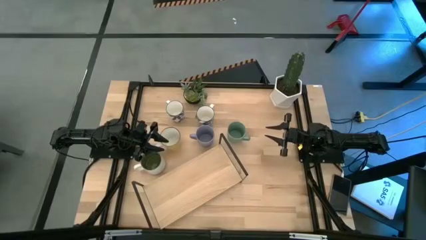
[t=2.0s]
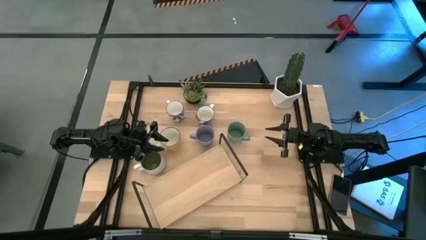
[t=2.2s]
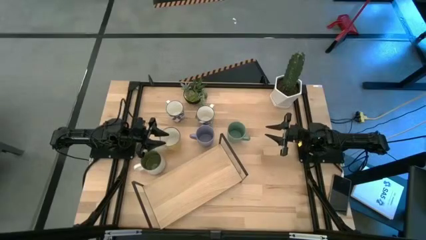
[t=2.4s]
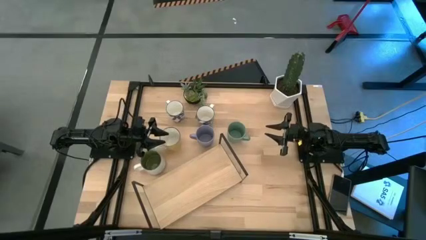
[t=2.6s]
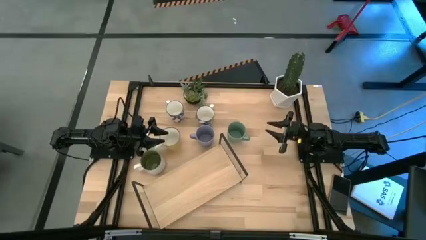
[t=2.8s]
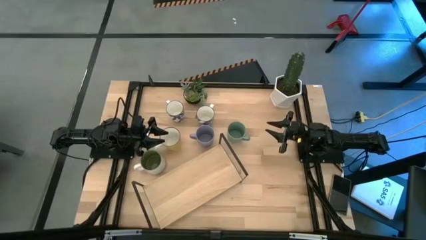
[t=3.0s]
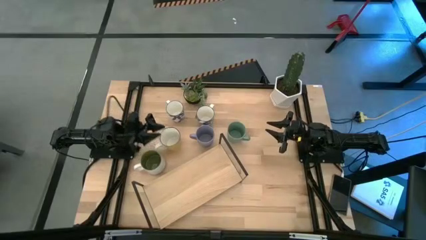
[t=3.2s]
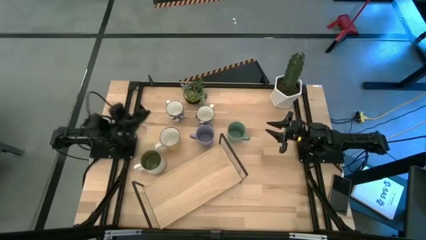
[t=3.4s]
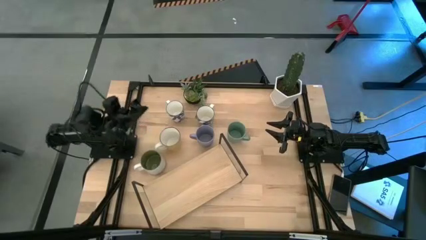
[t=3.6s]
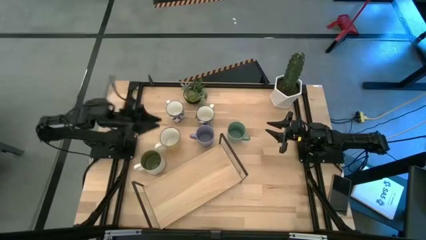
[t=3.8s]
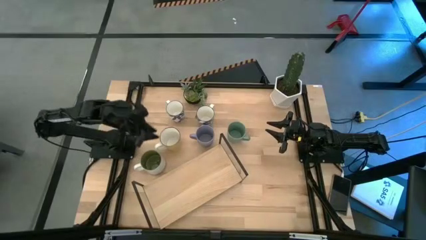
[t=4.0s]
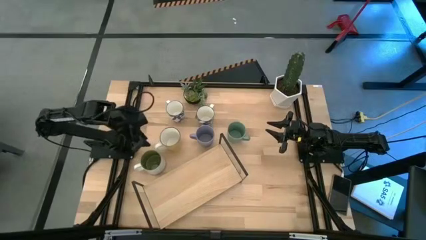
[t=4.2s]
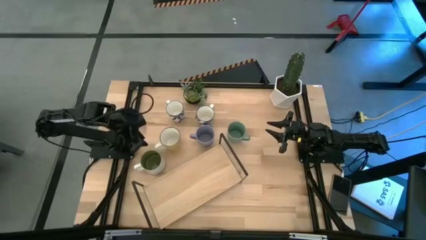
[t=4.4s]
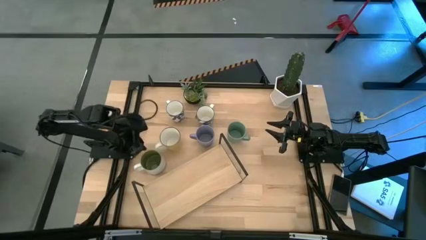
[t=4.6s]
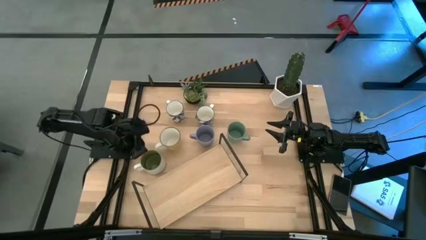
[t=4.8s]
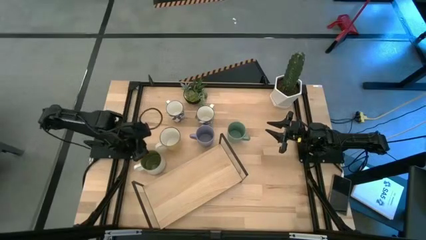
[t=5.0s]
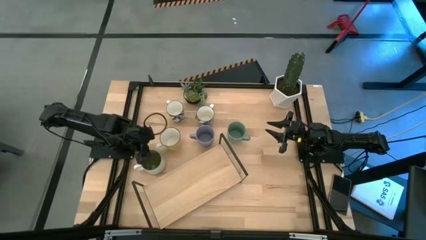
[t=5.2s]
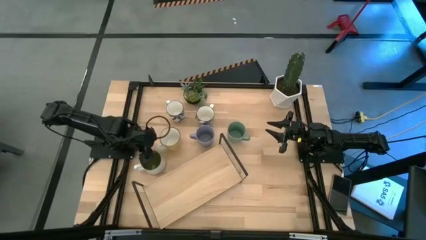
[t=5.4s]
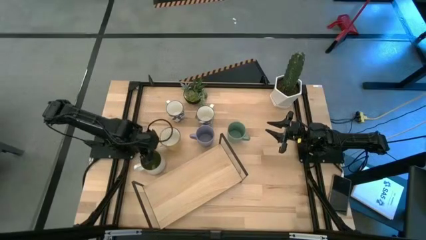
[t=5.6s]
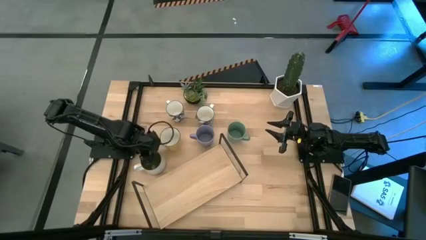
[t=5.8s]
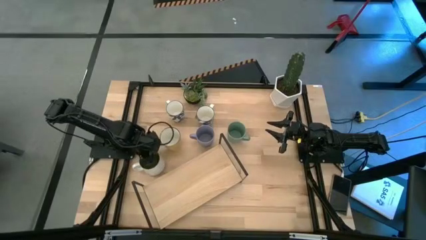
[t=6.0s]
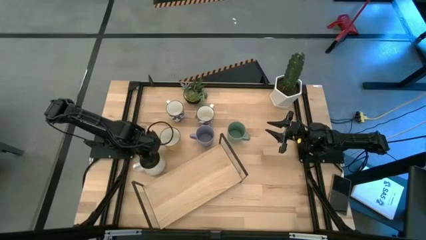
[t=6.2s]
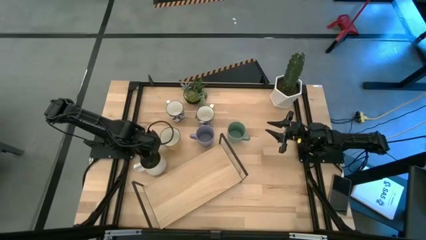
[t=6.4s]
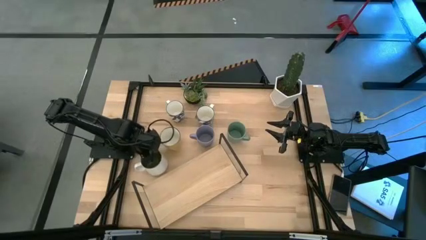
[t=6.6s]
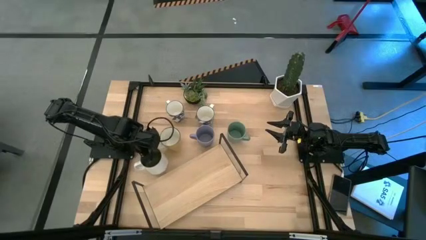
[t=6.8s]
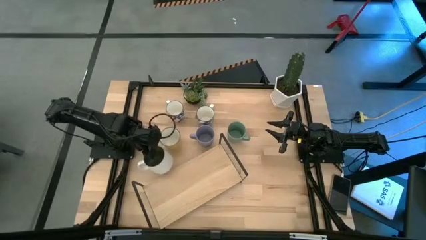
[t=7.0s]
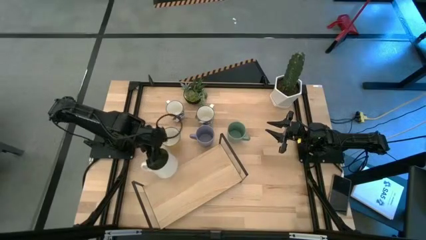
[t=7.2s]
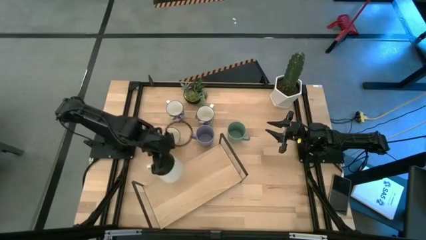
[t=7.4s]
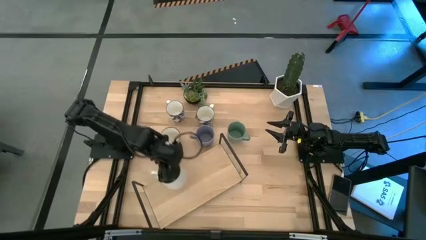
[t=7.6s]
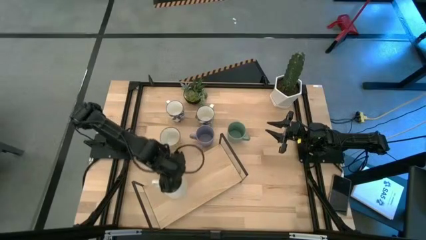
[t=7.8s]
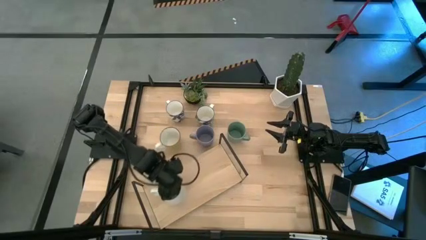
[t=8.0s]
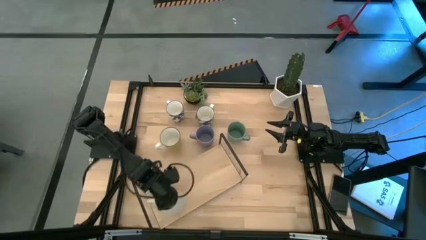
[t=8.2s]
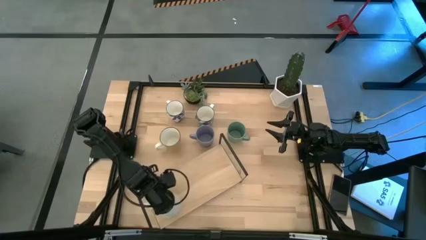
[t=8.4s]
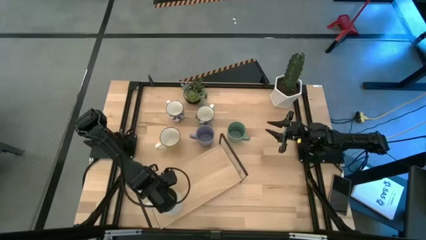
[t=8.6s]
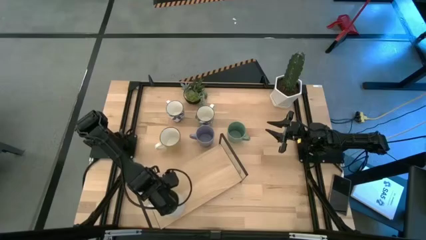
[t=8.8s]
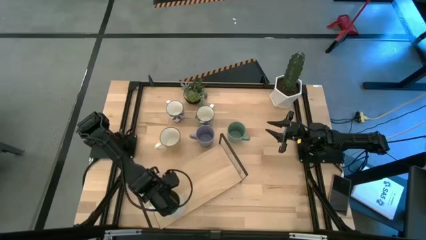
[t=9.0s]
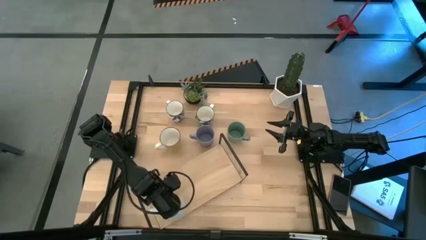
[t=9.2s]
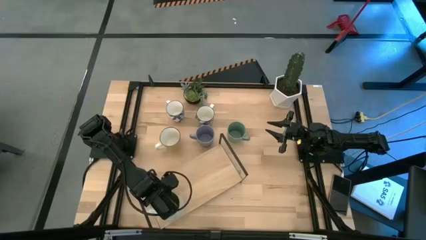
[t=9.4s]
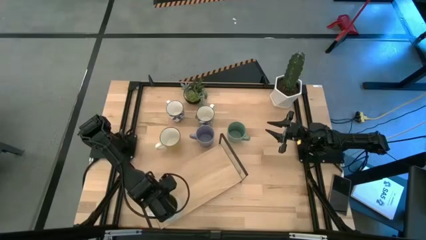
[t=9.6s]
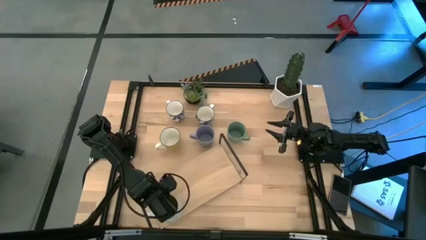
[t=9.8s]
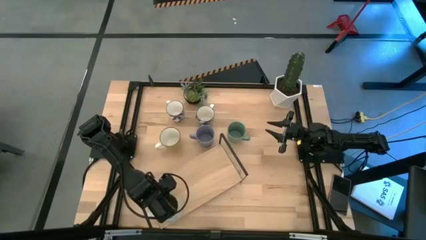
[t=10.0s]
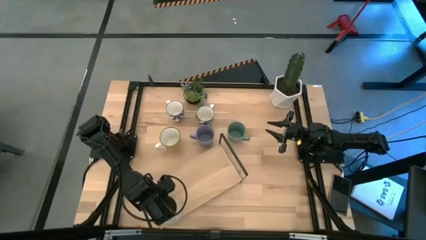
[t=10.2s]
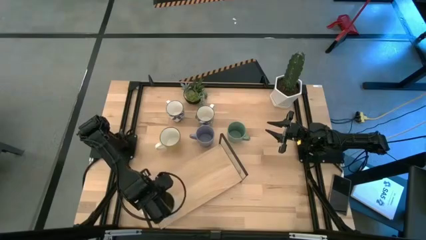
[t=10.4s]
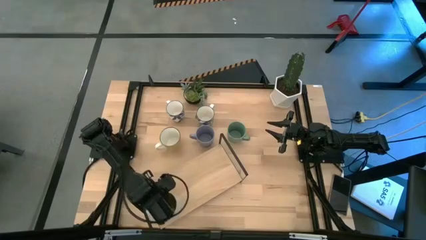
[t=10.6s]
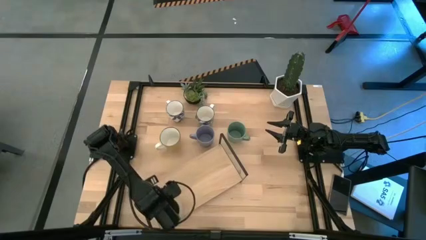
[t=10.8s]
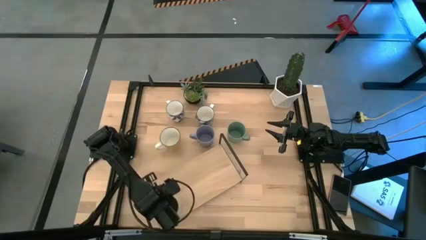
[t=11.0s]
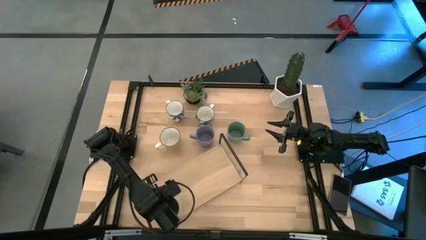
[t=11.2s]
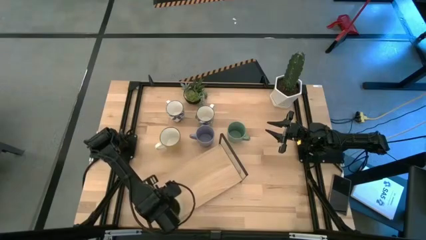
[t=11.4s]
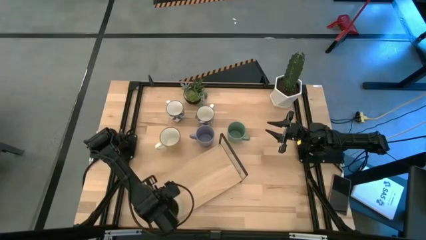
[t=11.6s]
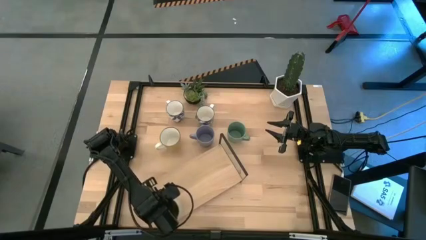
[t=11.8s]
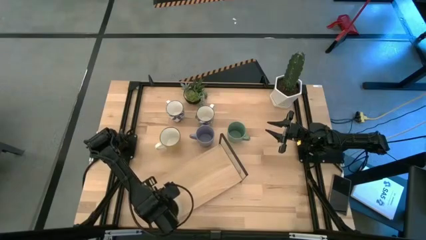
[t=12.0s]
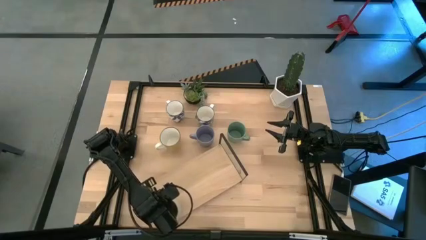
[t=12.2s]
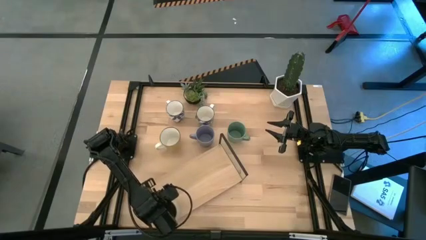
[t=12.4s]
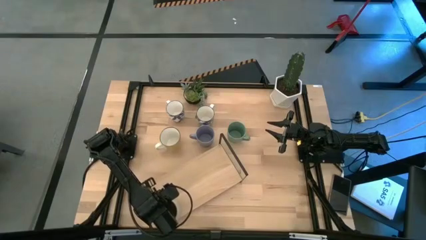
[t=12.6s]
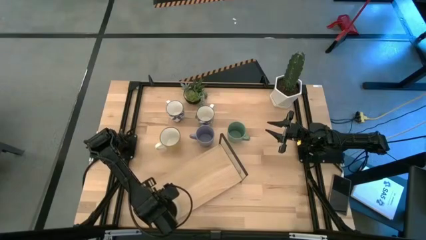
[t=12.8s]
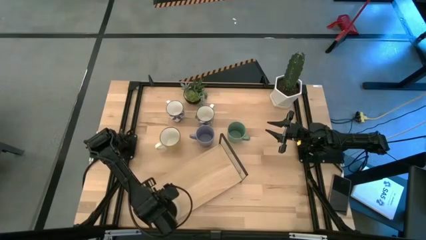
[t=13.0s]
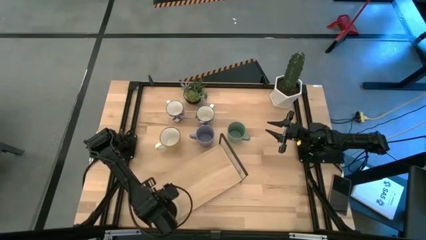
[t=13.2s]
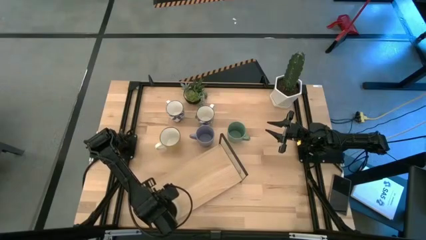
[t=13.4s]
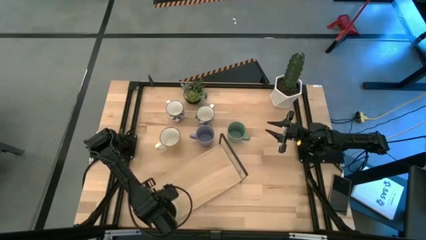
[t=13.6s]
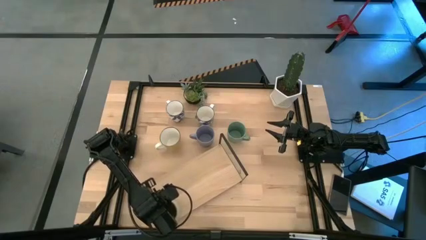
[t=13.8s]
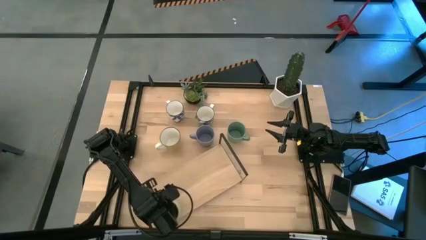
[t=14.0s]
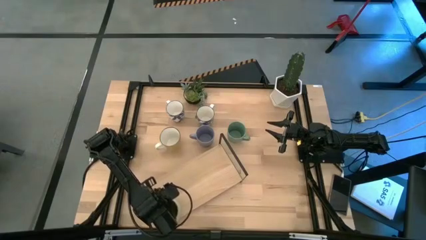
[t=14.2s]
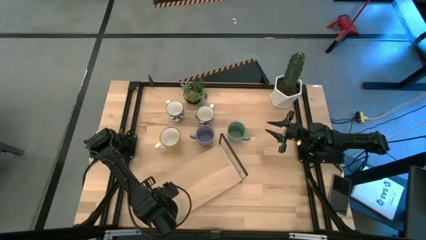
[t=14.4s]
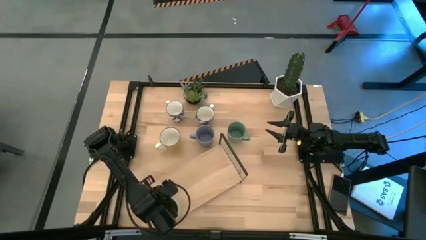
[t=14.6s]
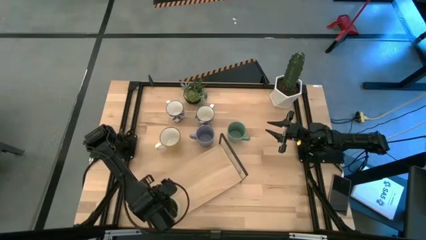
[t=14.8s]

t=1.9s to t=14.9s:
Task: Place coffee mugs
Put the white green mug at the bottom left corner of the shelf

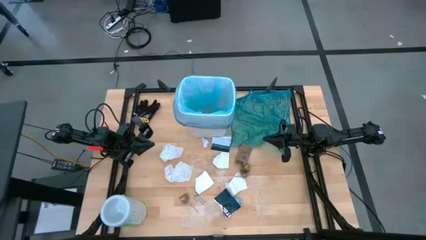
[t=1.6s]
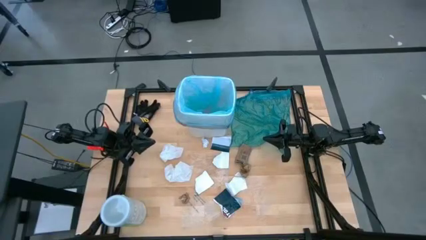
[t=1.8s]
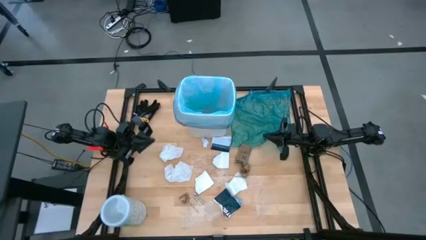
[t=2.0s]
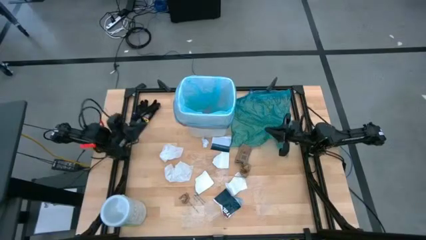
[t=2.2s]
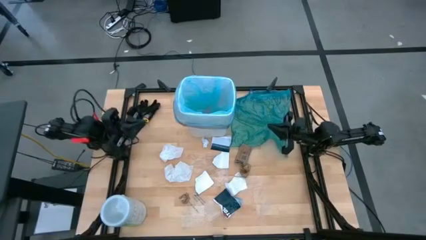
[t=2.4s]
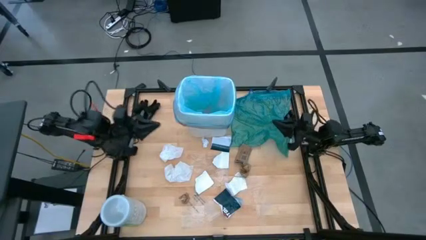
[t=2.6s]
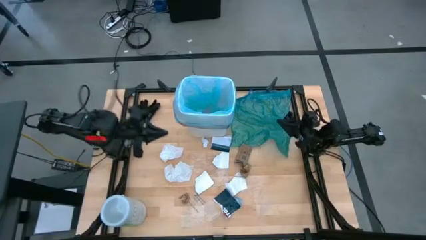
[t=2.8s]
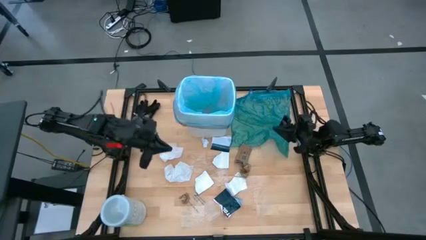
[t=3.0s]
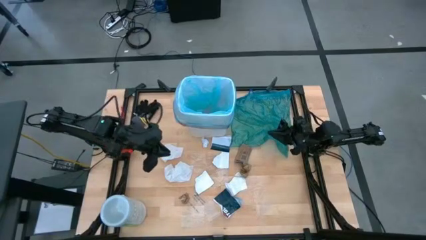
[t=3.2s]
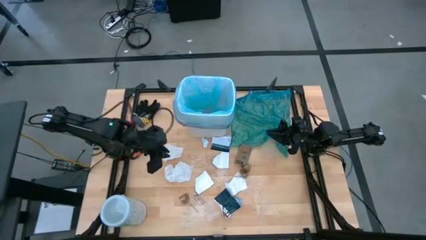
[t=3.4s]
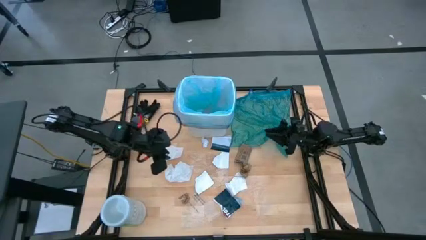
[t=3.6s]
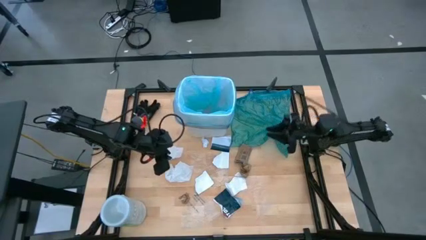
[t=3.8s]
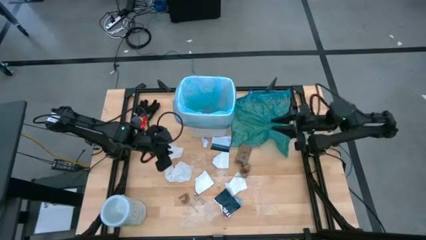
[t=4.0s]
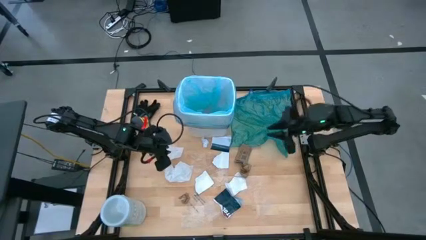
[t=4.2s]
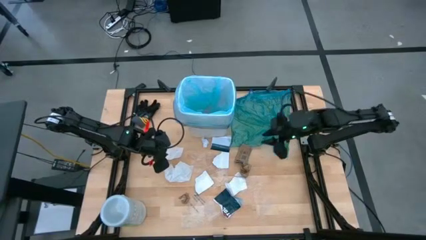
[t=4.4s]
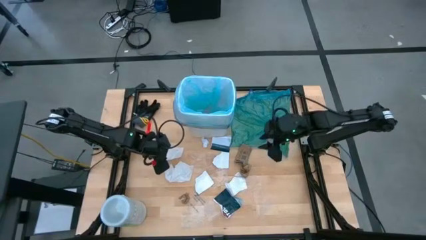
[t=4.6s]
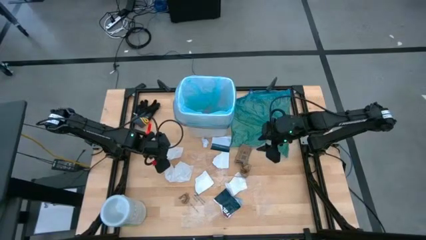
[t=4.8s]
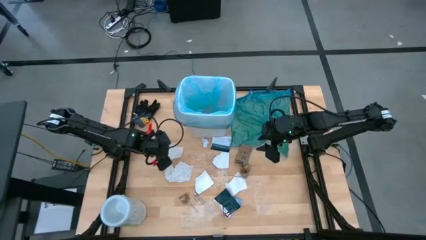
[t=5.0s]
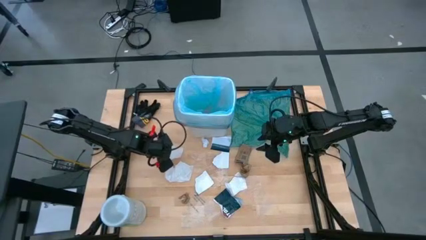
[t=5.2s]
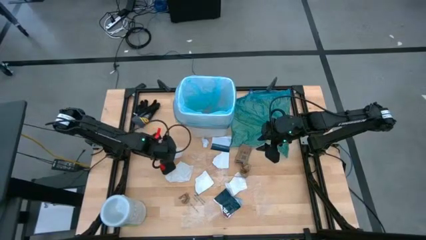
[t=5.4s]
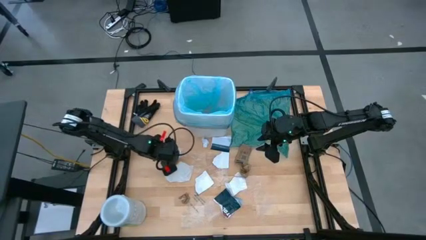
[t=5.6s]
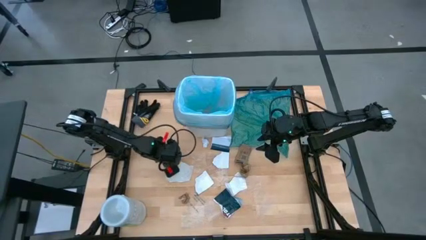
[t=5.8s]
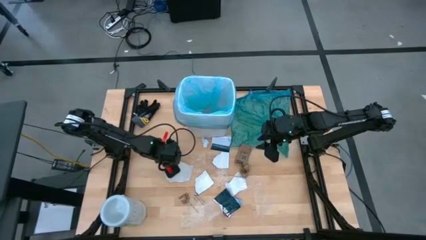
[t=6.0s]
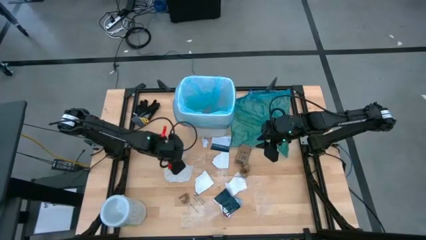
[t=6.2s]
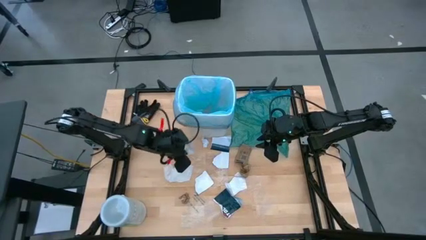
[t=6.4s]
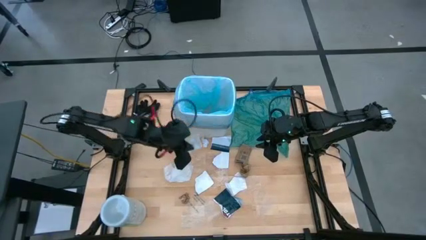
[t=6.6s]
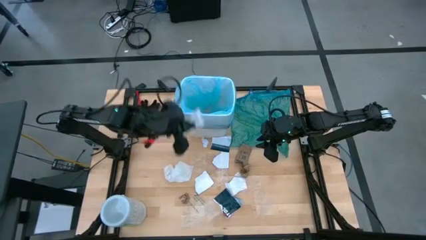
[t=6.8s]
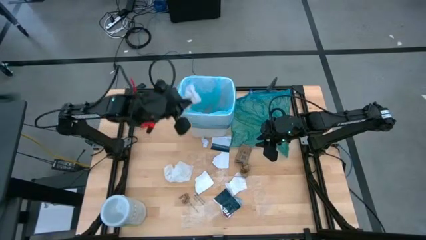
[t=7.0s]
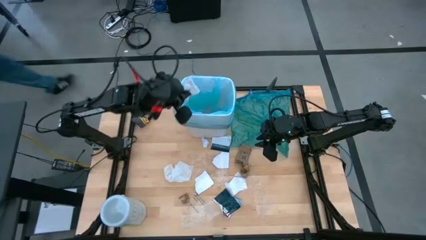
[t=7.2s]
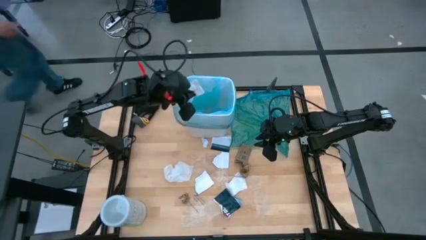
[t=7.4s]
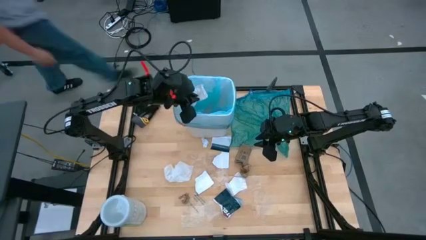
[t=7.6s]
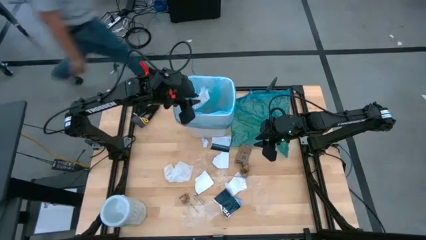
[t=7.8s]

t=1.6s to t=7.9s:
Task: place trash/remove bag and relplace
Put the white napkin into the trash bin
